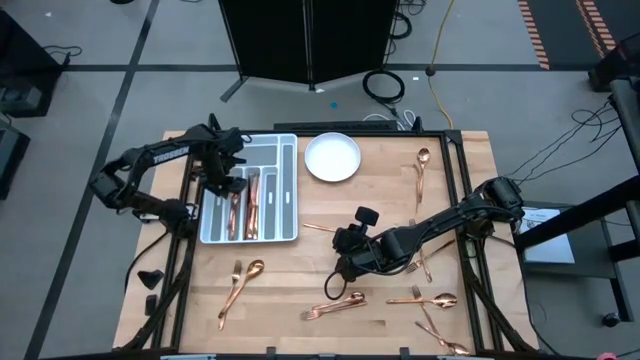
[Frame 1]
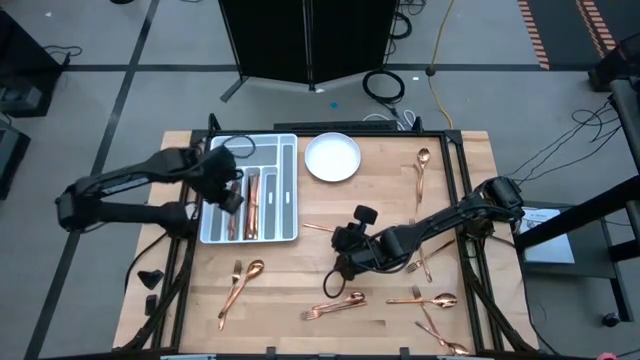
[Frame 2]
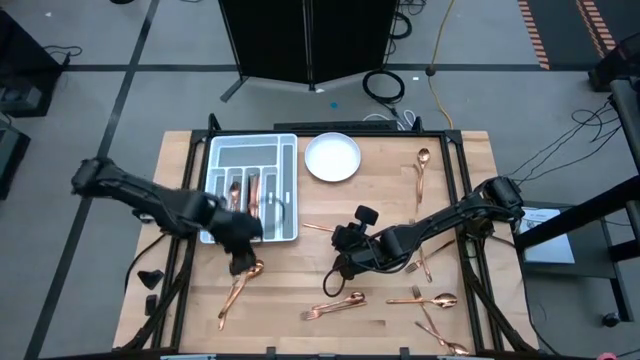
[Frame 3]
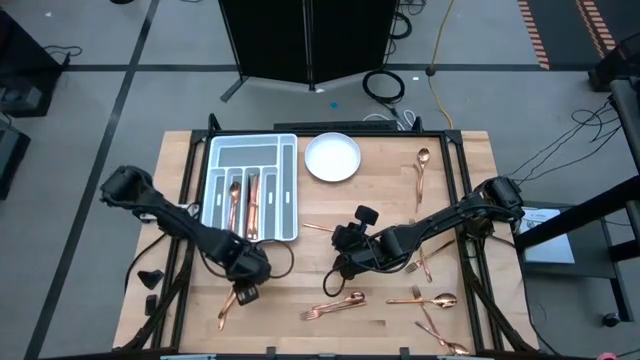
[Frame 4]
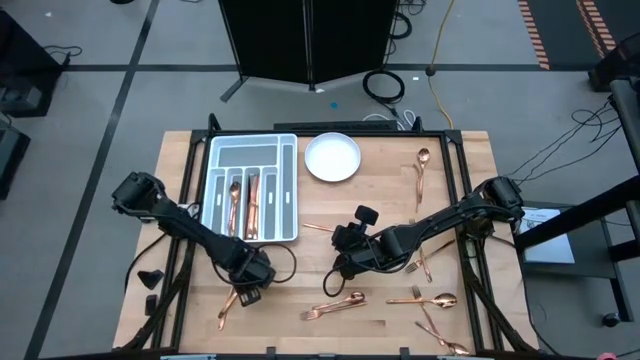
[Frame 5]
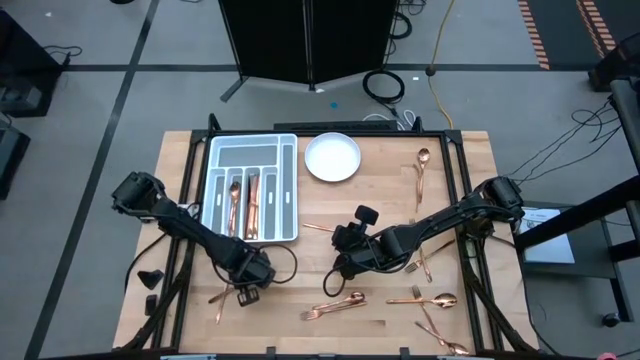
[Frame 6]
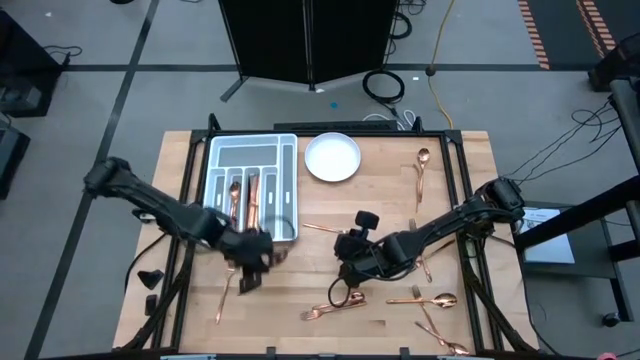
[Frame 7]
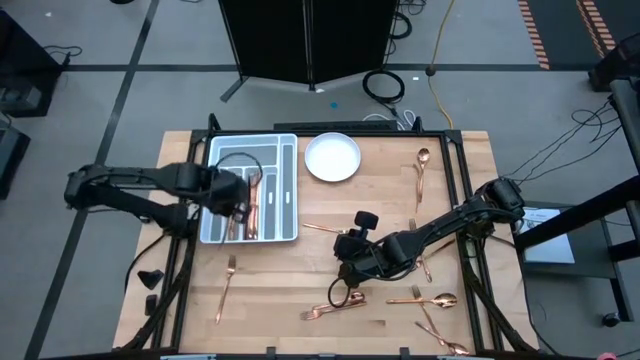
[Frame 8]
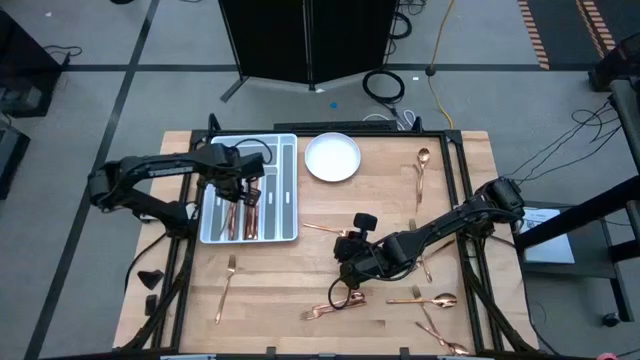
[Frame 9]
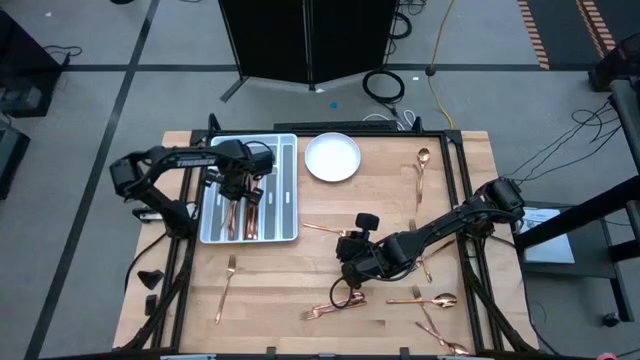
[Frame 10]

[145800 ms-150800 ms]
Task: Sort silverware
Put the spoon on the silverware tray

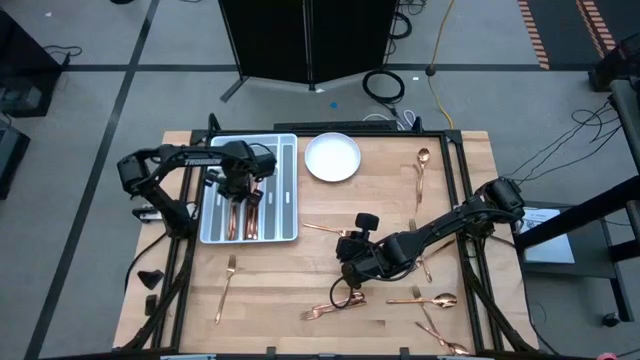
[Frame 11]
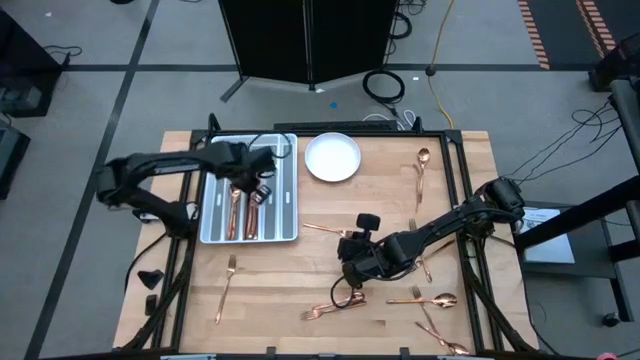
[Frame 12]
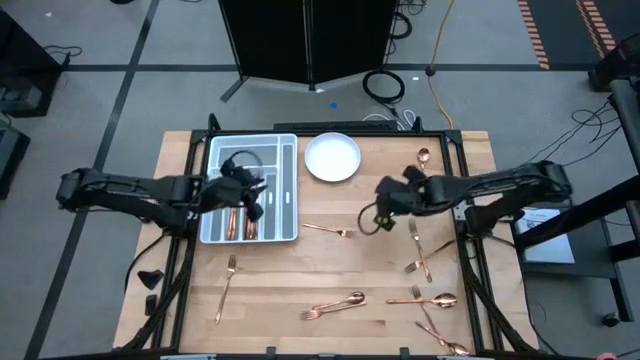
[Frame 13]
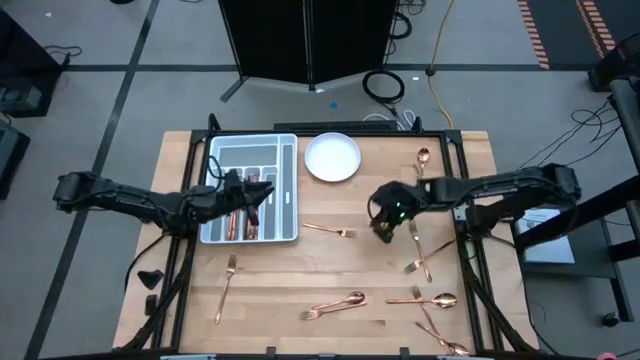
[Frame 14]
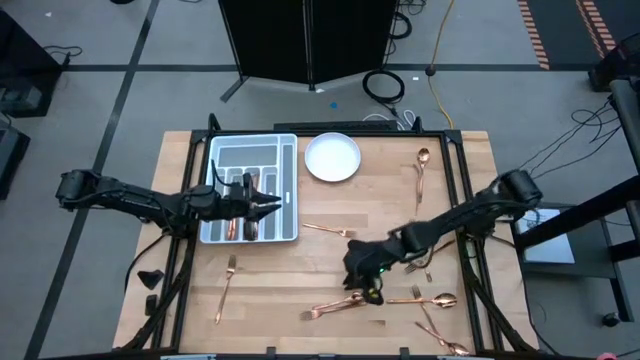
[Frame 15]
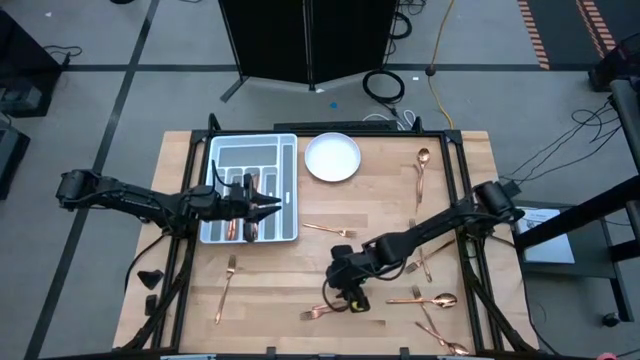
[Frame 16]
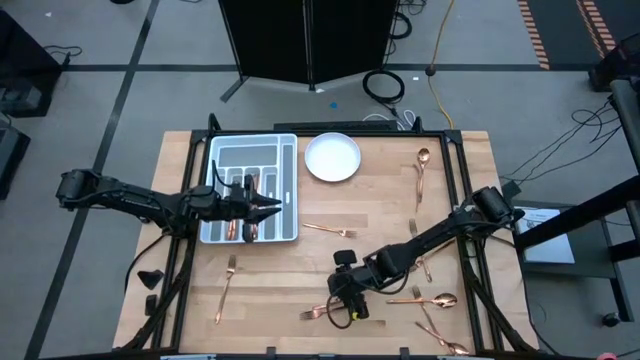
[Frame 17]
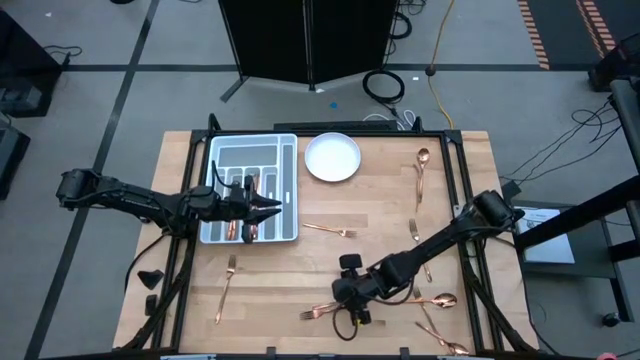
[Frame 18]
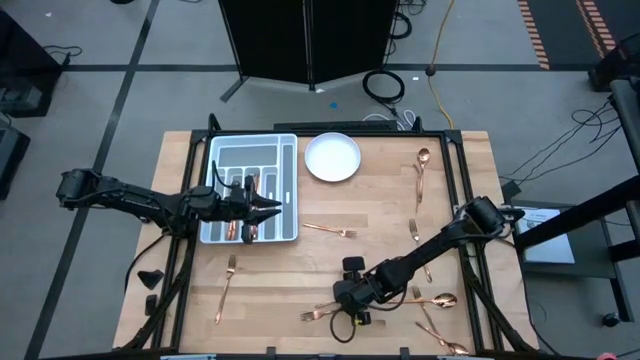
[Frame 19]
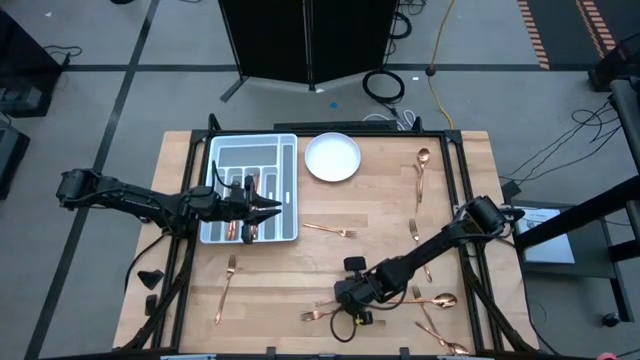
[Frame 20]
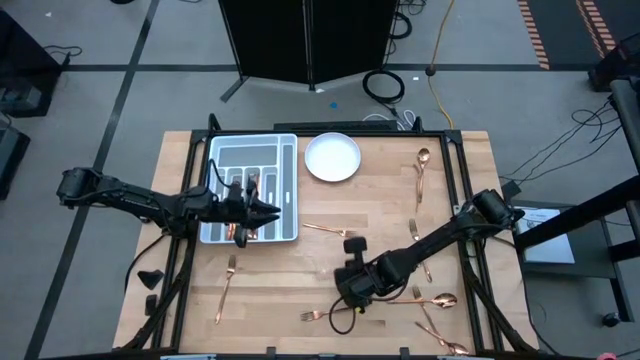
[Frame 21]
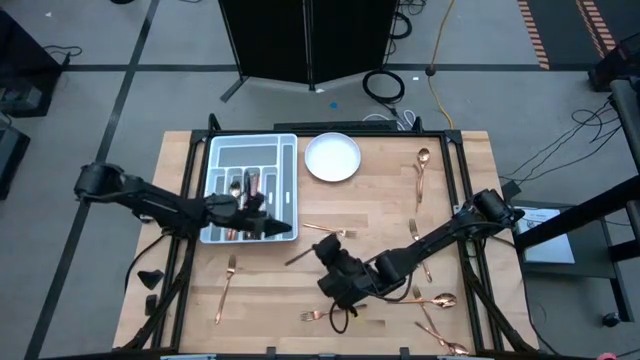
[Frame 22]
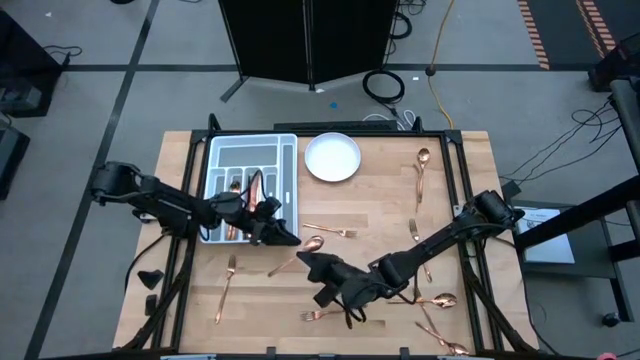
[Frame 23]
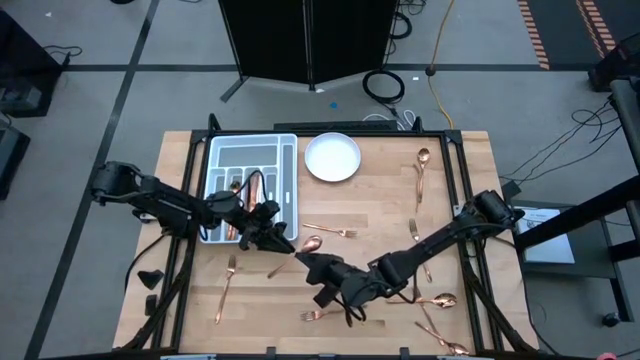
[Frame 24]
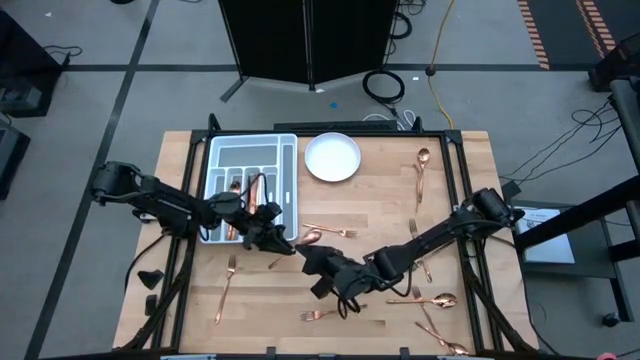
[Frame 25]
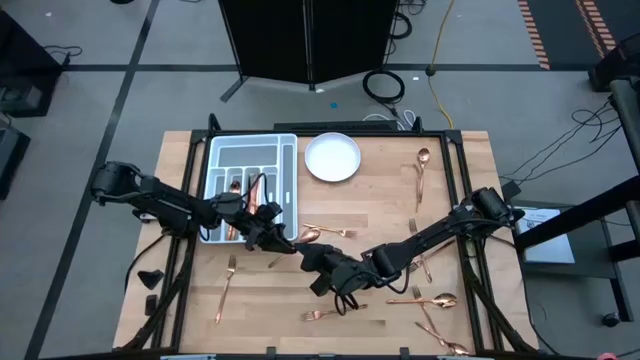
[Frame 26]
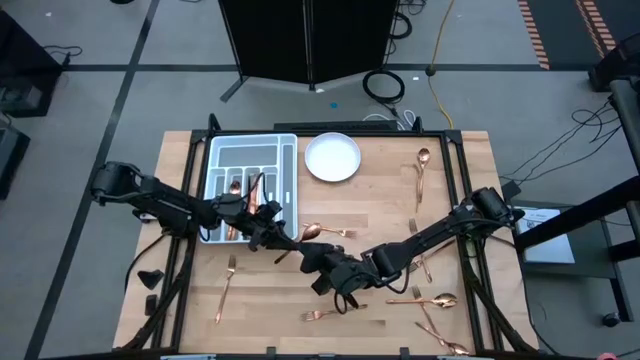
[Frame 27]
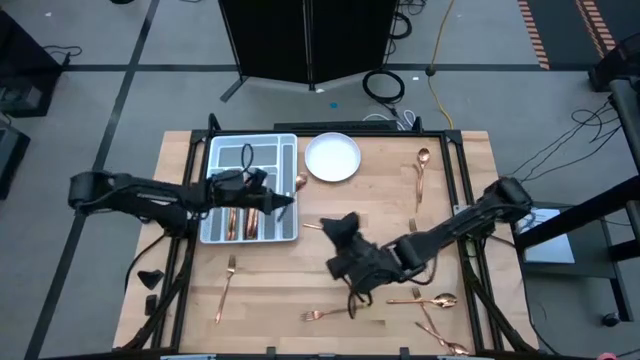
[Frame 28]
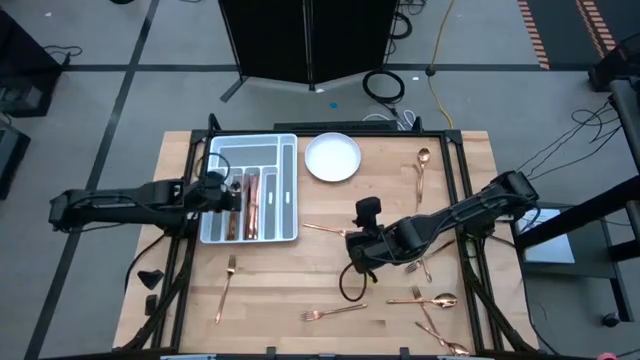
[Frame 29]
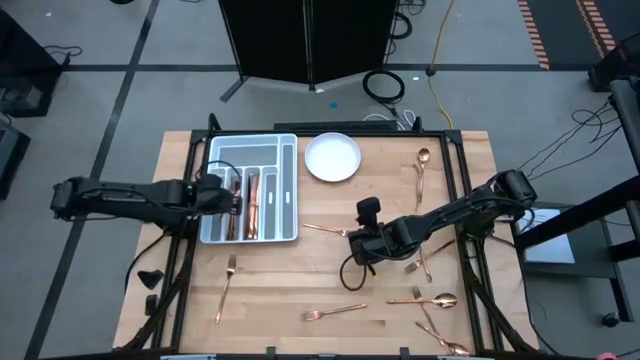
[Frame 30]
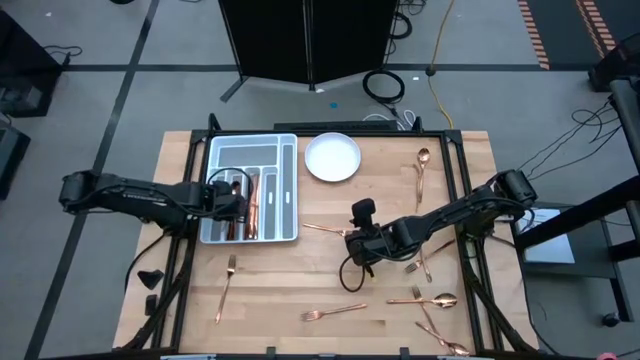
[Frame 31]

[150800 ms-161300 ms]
Put the spoon on the silverware tray

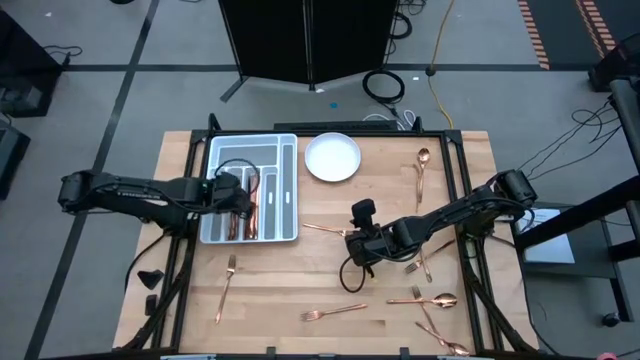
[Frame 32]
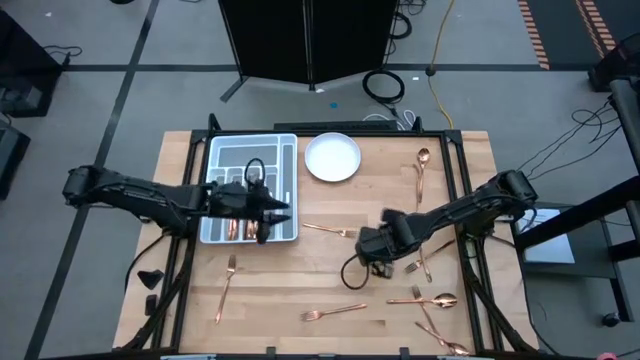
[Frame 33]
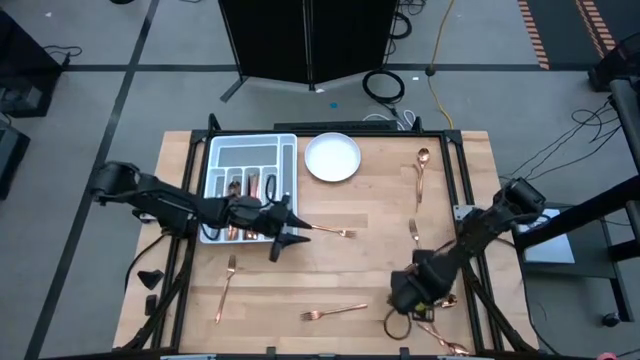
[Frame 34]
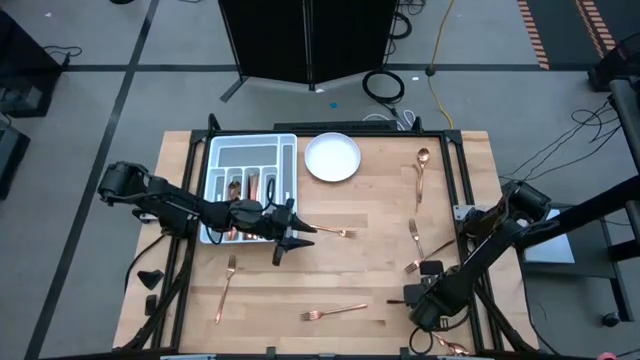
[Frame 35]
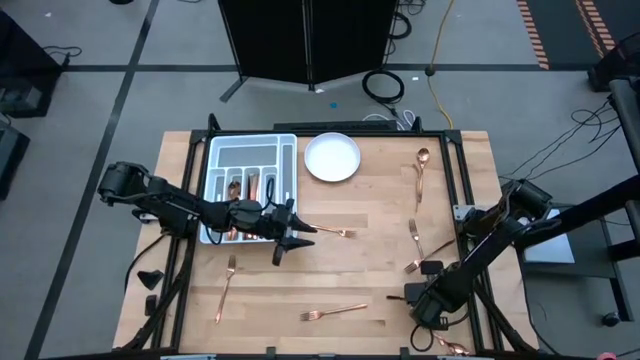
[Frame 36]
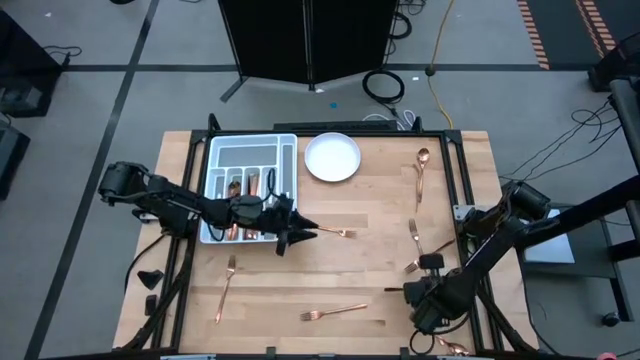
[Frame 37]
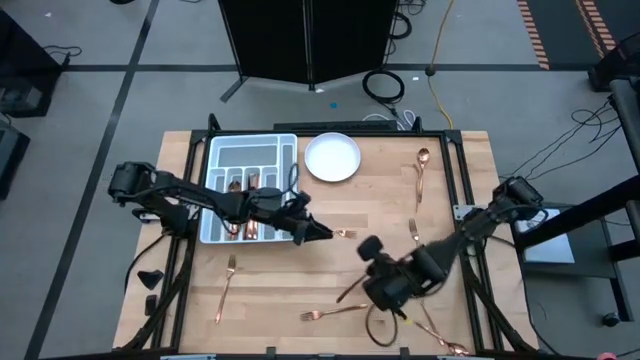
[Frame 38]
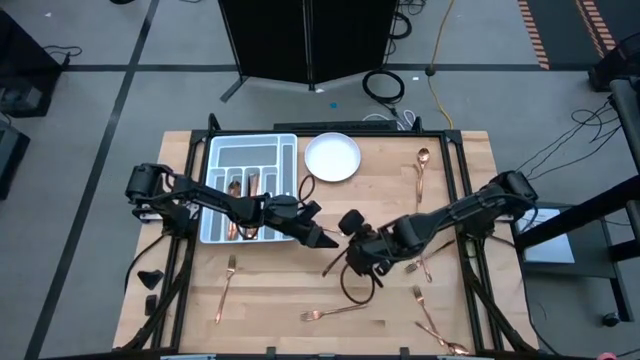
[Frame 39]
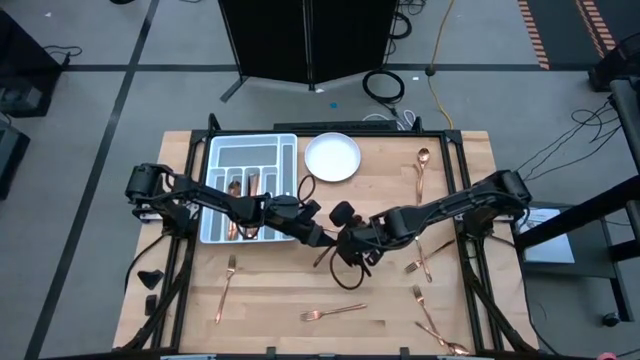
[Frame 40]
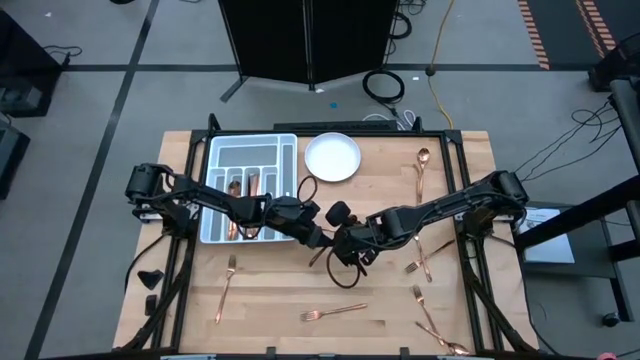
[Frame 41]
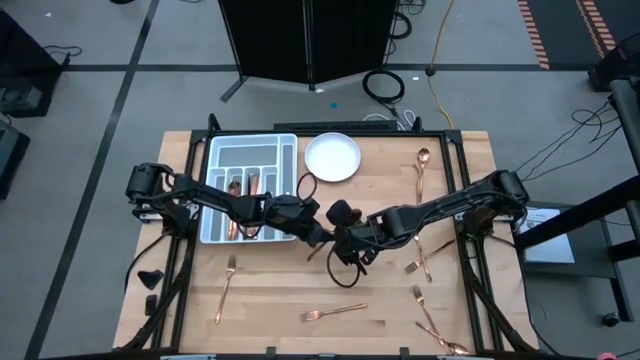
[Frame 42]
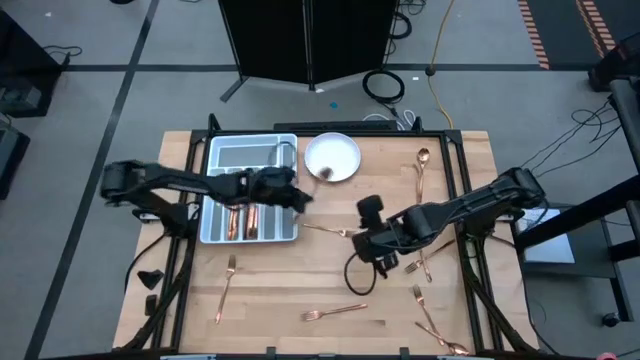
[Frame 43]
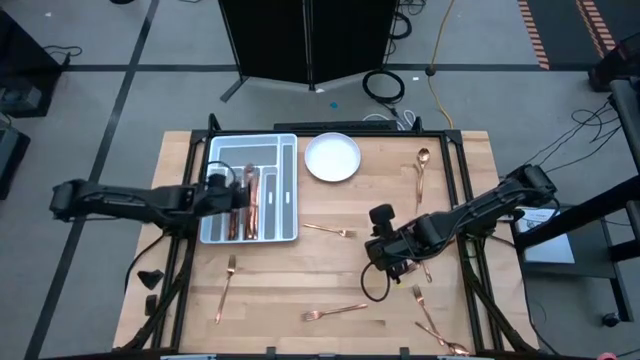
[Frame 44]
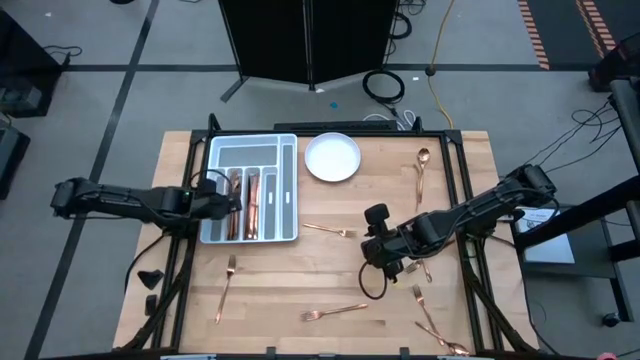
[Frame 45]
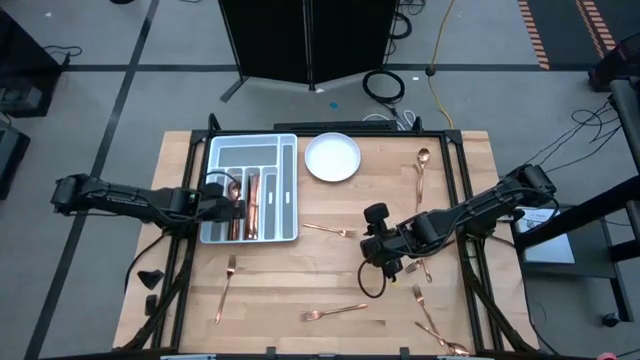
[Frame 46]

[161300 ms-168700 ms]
Put the spoon on the silverware tray
